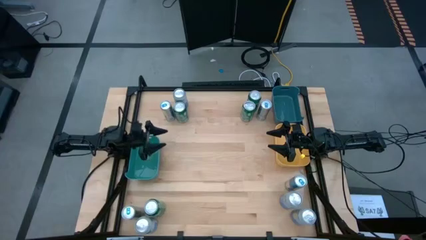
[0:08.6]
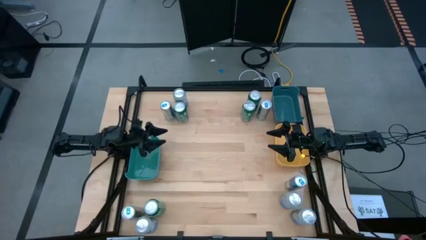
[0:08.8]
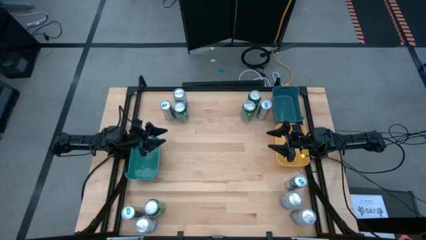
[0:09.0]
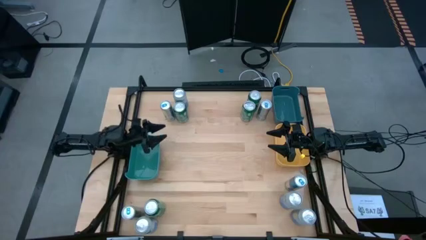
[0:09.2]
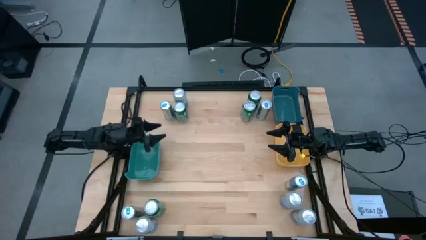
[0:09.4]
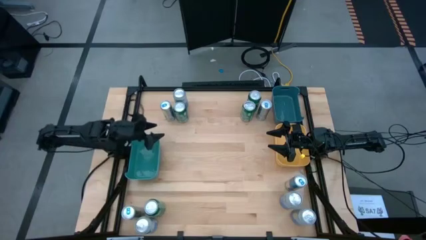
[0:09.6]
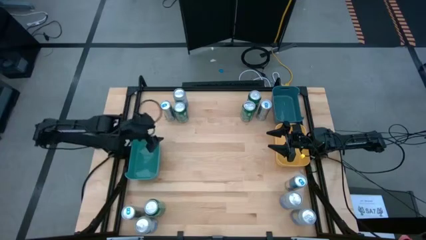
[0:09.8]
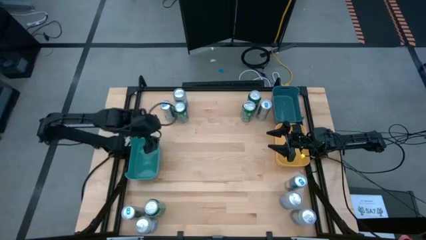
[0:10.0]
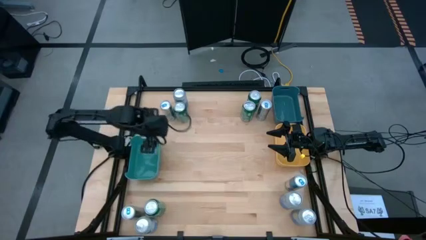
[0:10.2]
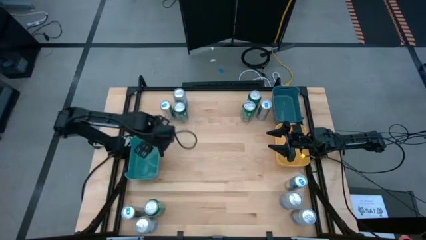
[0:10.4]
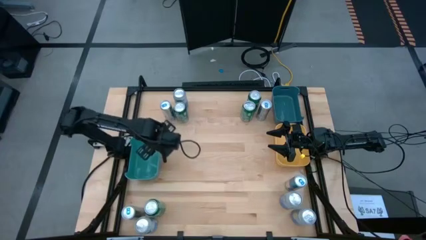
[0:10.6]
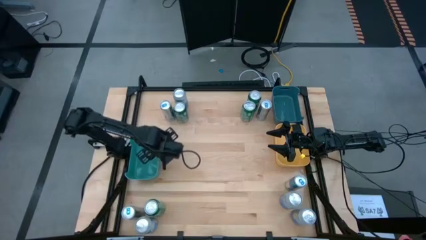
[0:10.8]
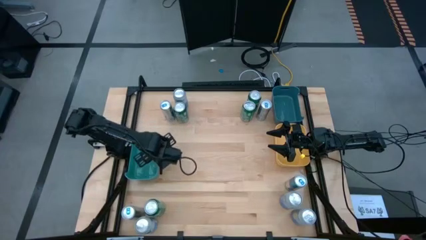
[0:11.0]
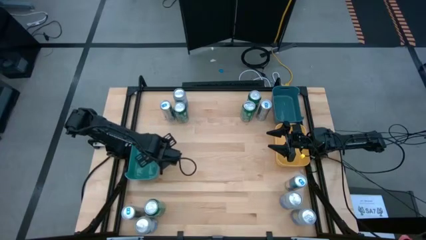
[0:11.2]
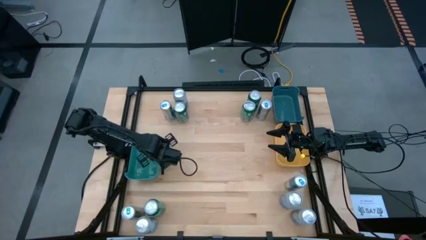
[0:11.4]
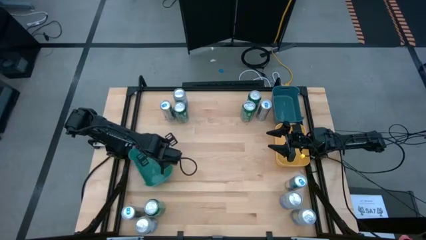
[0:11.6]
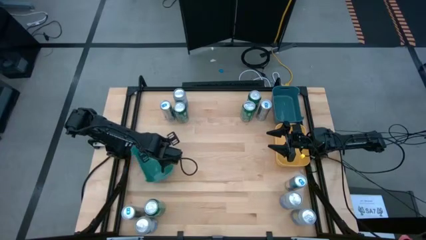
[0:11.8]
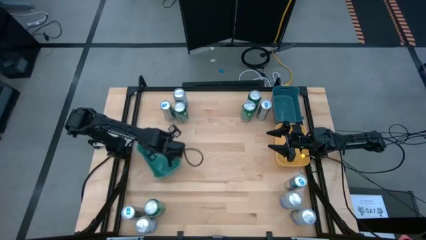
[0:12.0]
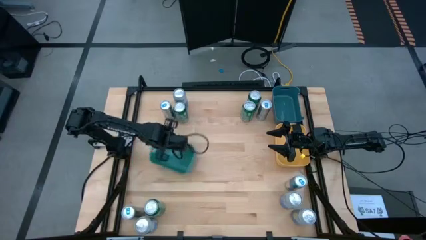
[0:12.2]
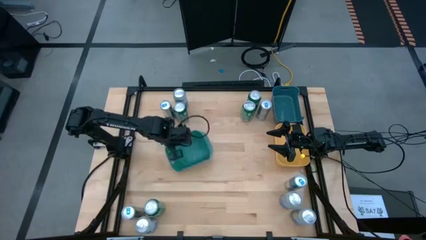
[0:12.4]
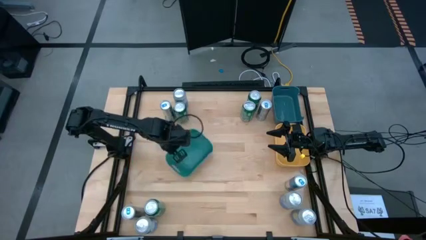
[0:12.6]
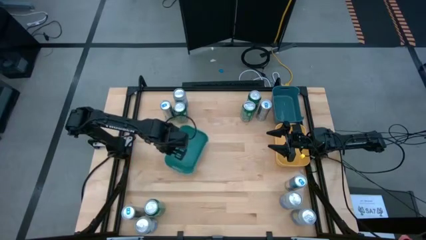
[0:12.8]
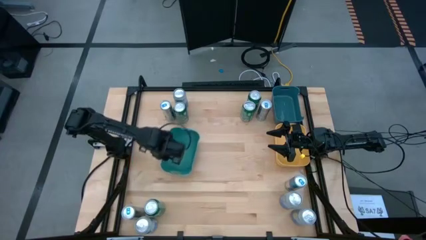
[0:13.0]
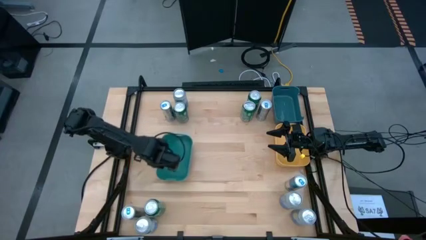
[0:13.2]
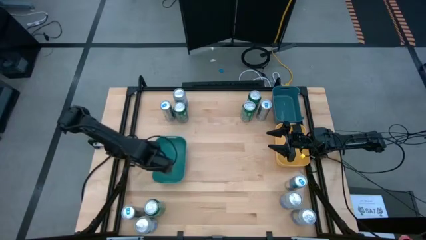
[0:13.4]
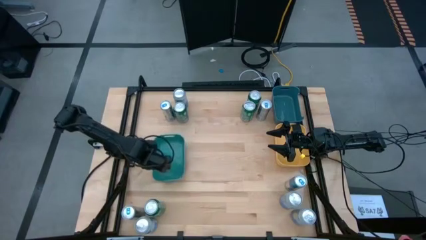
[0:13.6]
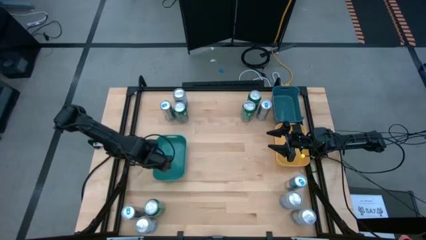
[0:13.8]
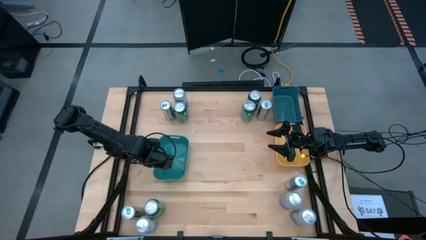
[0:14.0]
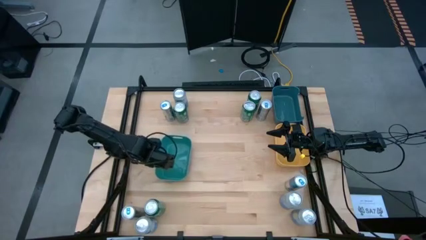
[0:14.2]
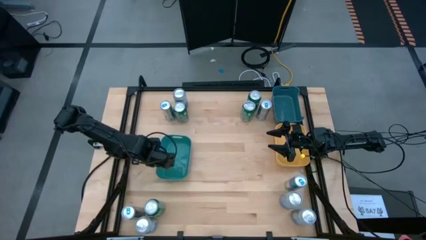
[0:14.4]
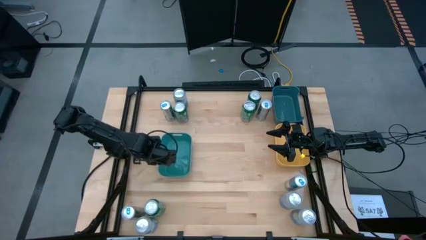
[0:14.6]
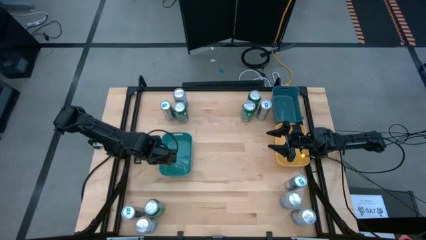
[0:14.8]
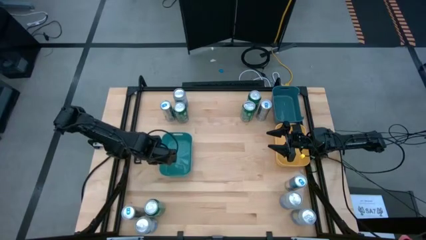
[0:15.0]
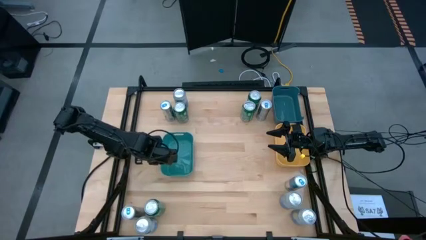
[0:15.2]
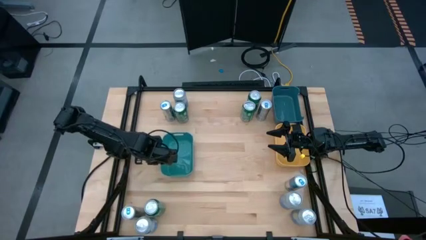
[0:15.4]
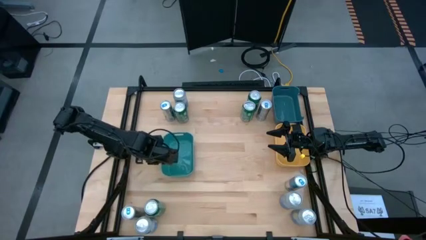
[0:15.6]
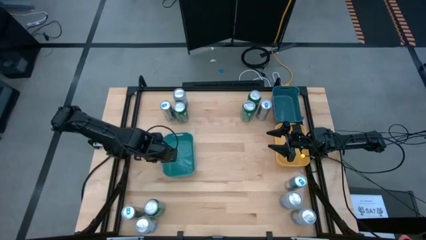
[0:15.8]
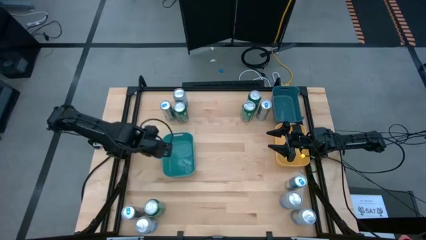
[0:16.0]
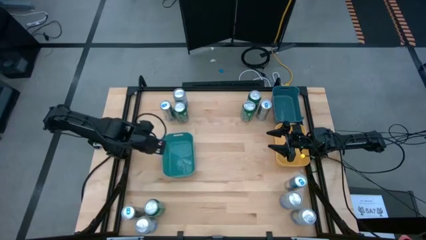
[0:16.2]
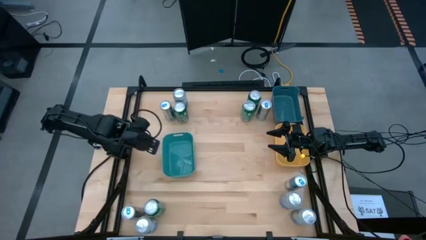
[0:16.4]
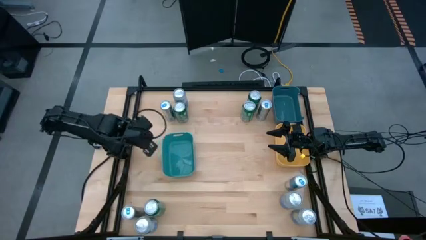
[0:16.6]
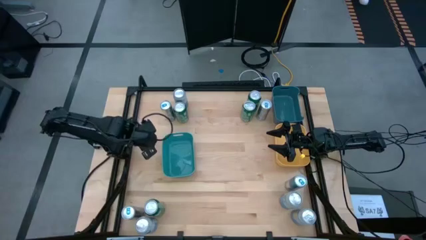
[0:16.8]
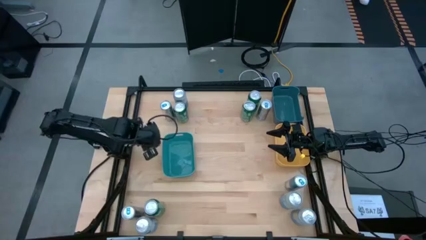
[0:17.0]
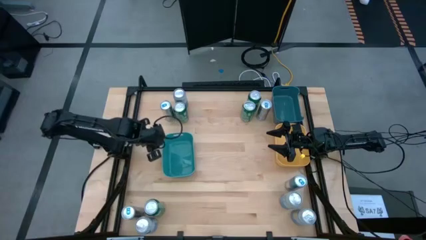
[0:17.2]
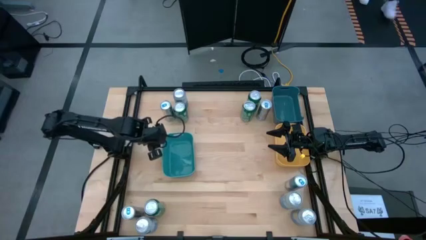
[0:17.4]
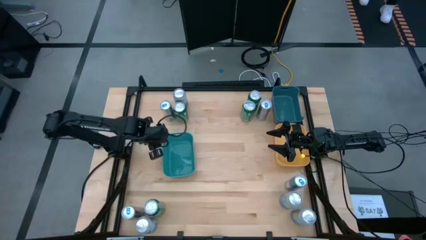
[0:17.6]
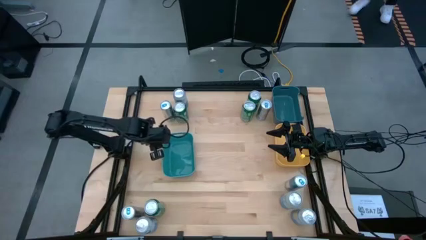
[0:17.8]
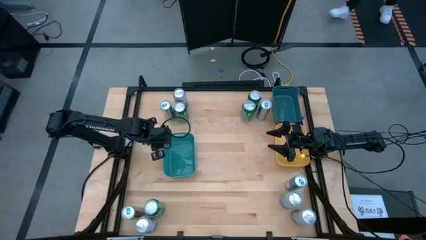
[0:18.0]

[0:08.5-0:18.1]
Task: Sort soda cans
Move the green bin to the center left of the table

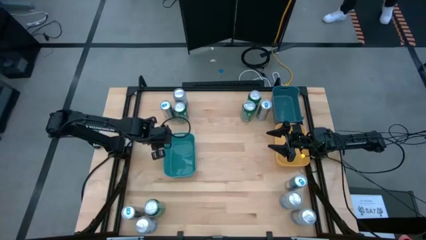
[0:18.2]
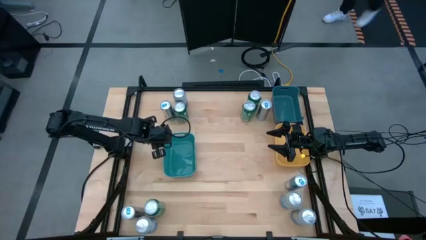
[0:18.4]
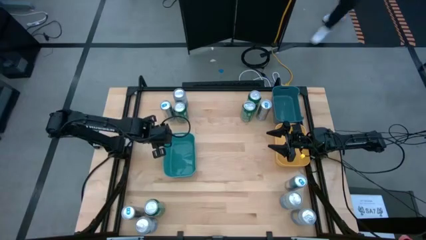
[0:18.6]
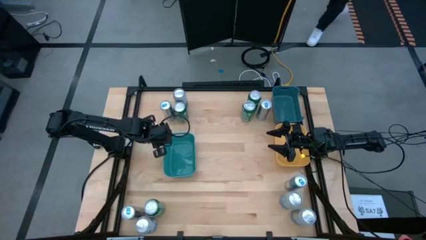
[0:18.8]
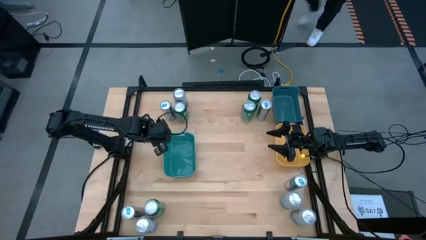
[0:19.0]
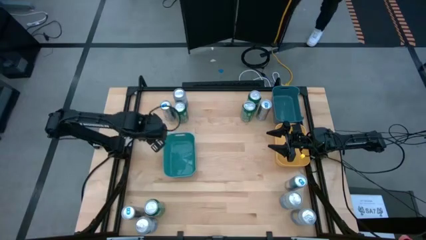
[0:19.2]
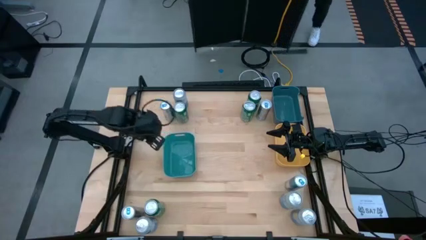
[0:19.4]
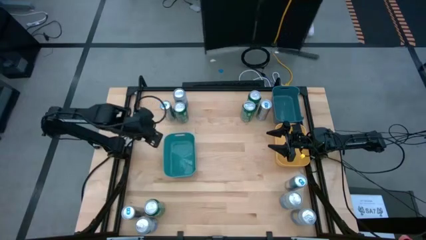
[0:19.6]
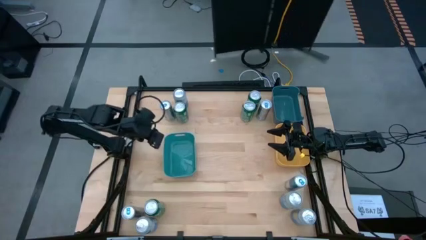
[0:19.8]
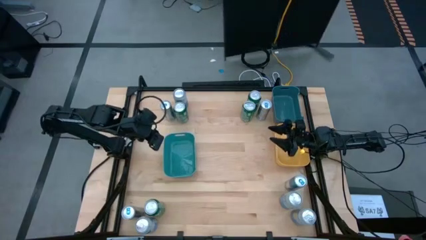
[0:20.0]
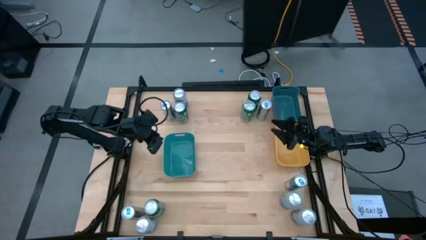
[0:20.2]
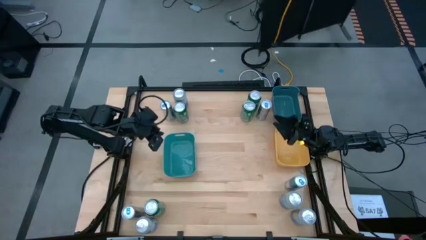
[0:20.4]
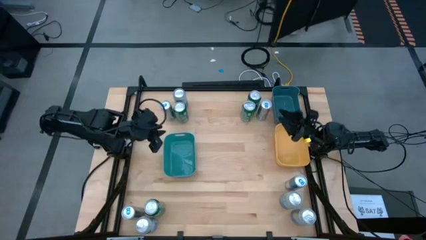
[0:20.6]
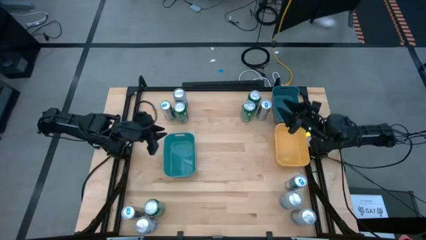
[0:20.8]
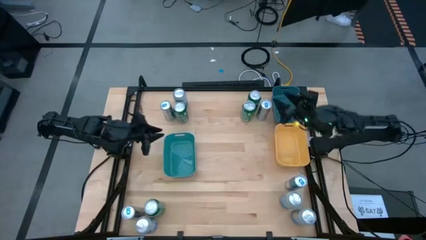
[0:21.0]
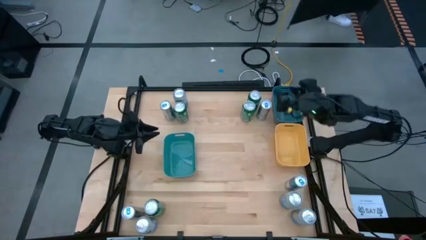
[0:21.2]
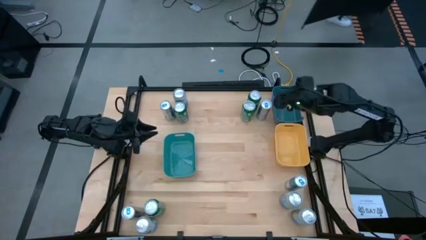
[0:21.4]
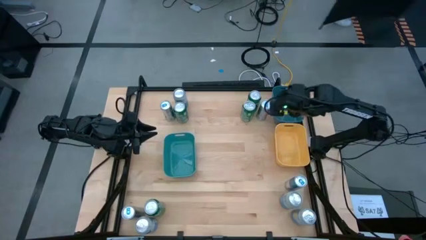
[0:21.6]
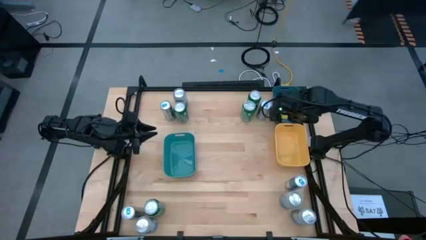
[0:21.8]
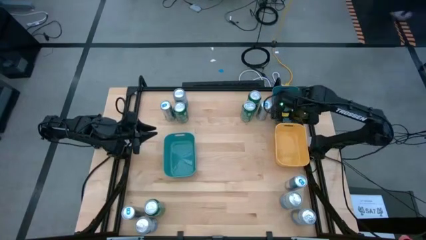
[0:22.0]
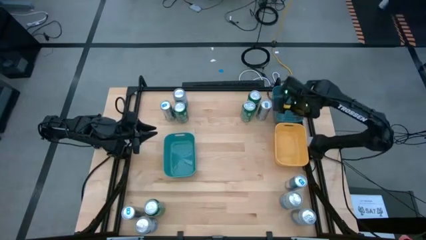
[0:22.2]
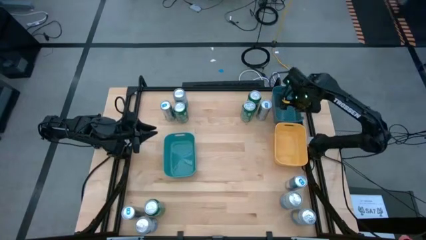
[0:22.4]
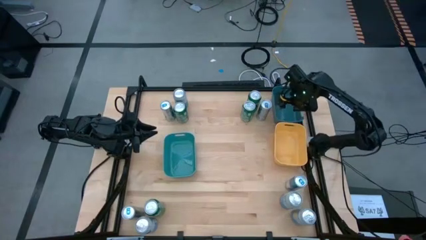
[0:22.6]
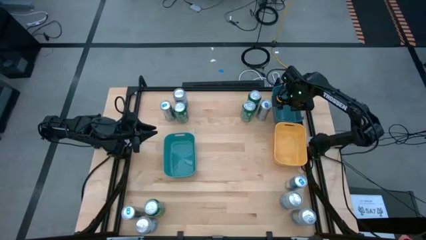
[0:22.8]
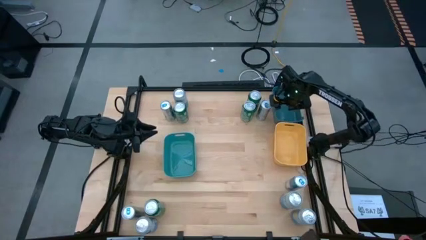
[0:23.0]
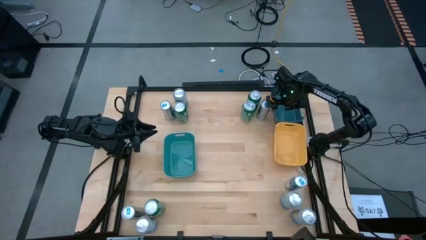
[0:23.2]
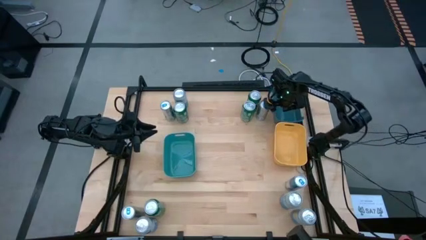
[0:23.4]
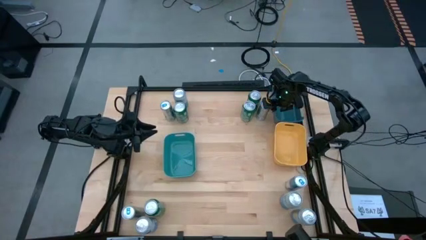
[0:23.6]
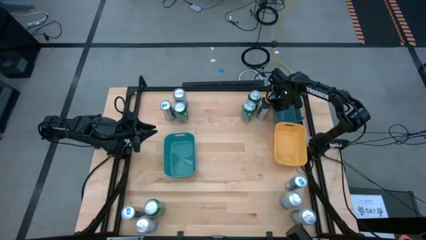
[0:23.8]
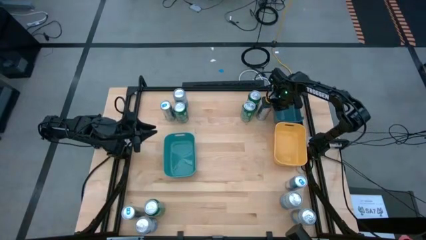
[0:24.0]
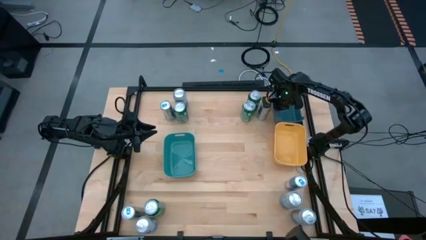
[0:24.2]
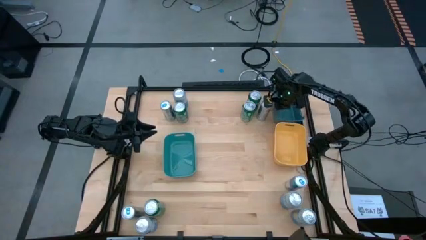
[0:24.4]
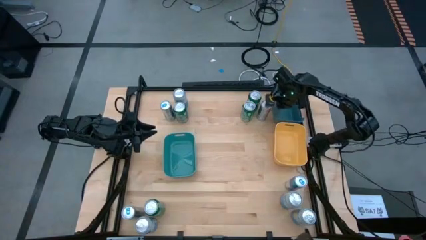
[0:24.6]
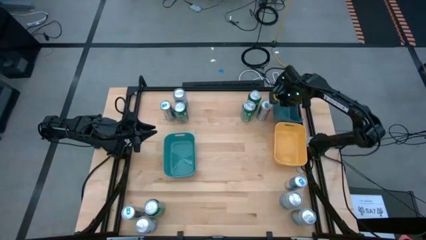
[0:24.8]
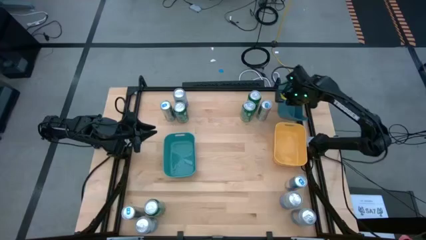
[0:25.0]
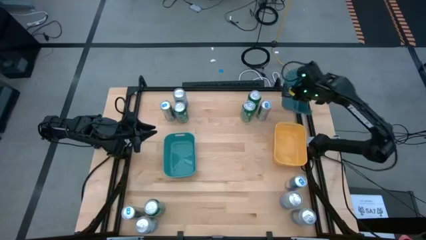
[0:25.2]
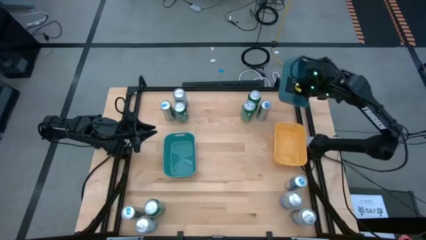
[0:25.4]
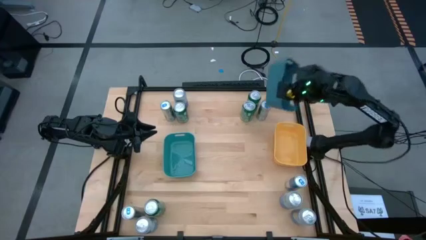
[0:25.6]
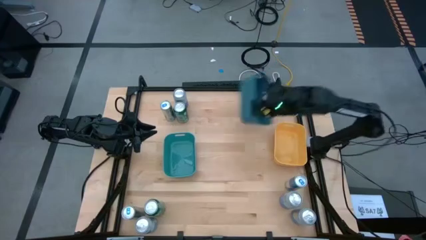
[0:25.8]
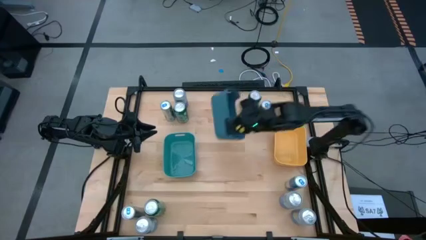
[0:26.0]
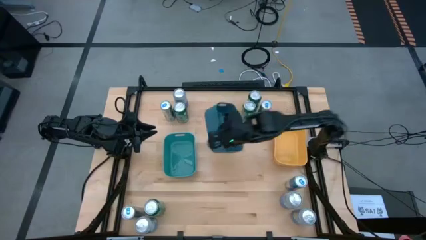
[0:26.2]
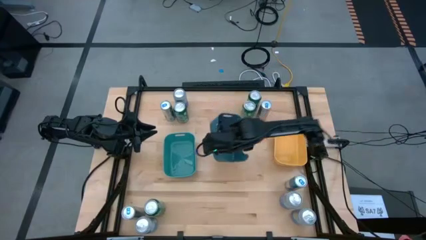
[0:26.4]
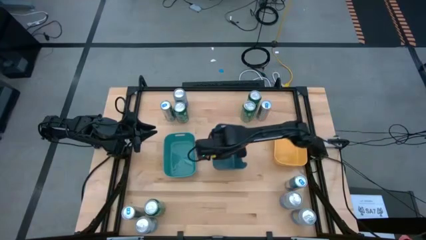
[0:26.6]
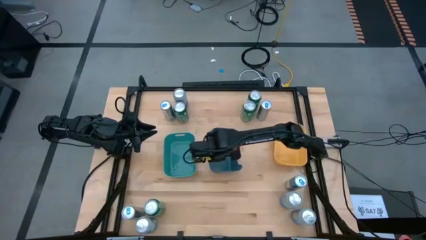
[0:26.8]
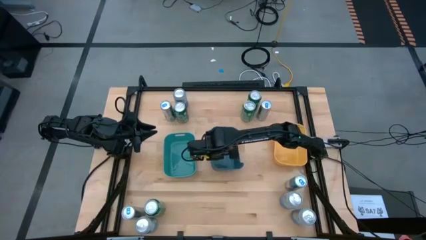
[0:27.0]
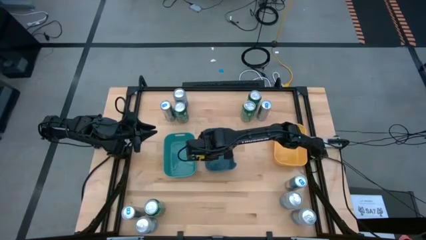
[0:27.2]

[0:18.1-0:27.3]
Move the blue bin to the center of the table
